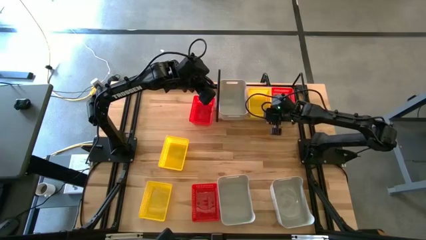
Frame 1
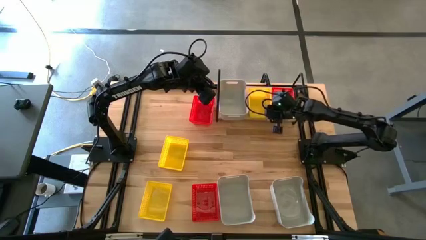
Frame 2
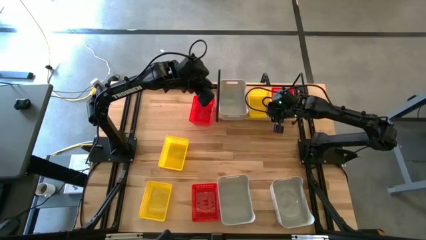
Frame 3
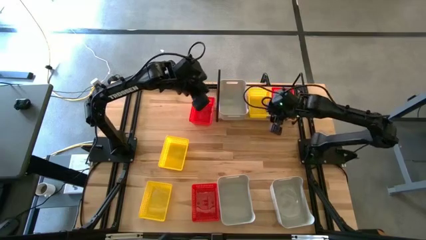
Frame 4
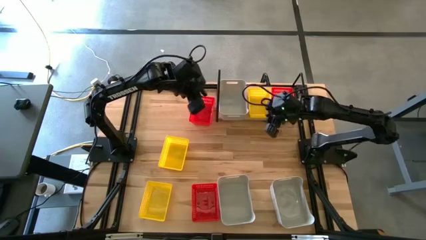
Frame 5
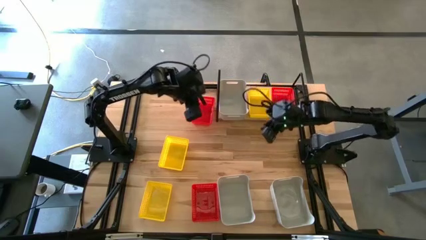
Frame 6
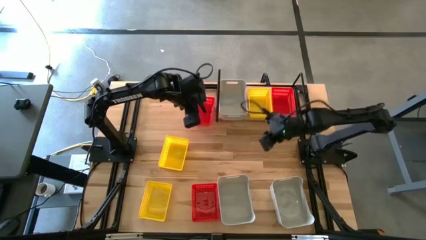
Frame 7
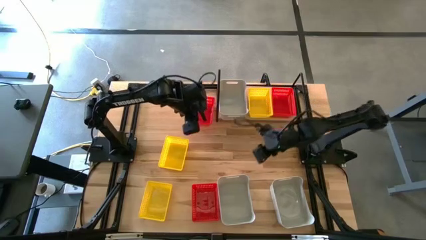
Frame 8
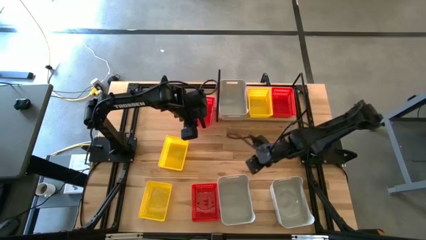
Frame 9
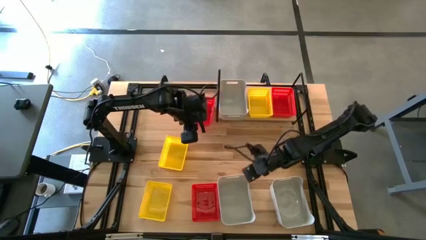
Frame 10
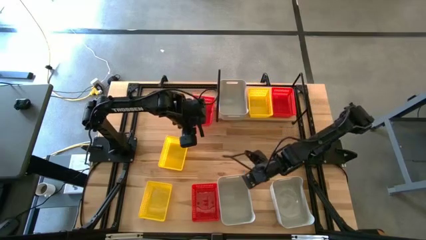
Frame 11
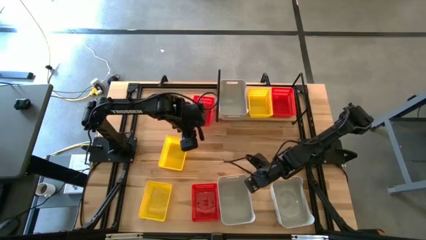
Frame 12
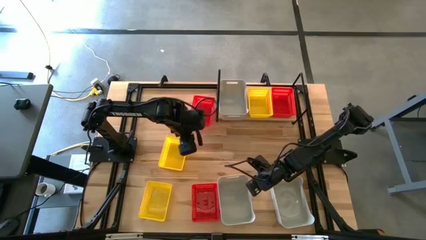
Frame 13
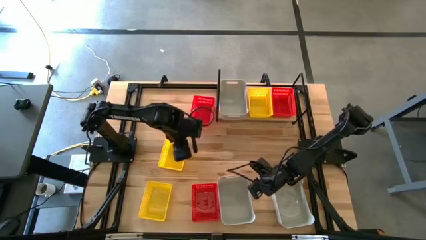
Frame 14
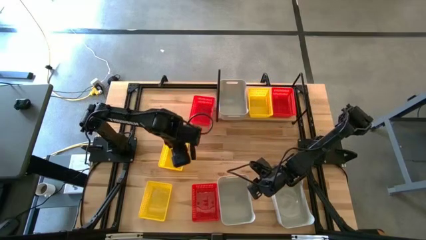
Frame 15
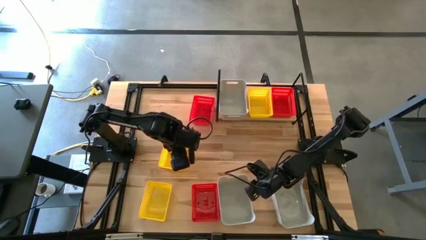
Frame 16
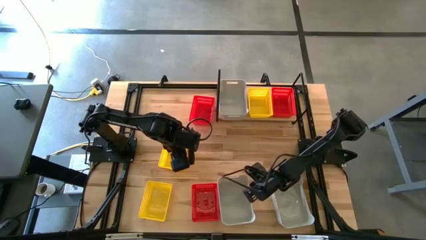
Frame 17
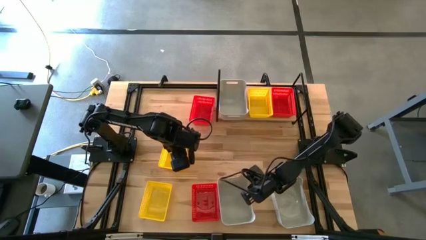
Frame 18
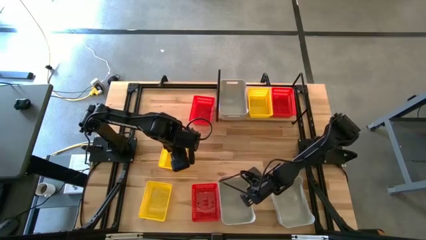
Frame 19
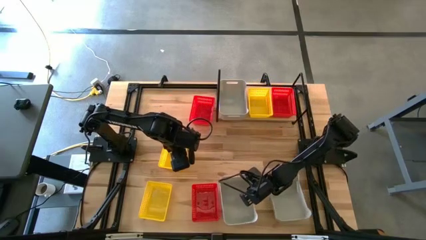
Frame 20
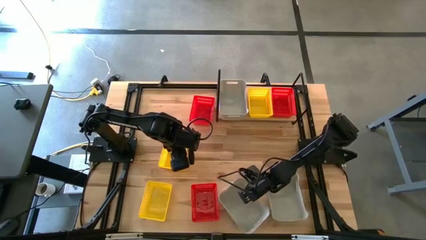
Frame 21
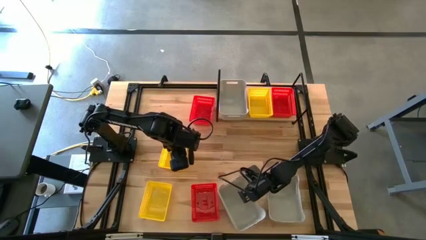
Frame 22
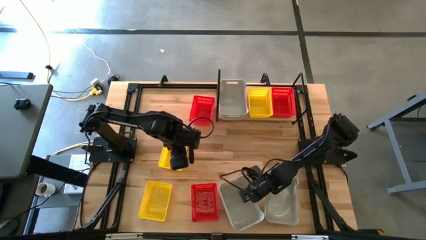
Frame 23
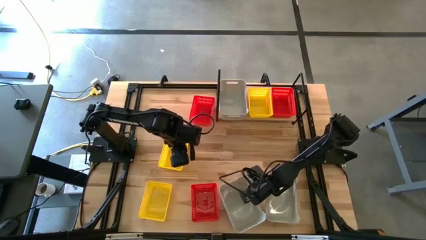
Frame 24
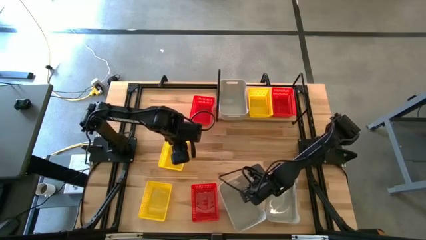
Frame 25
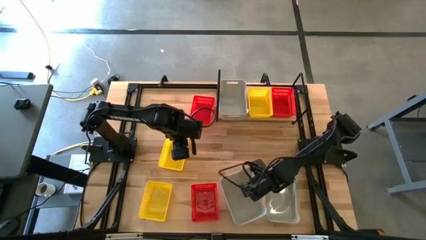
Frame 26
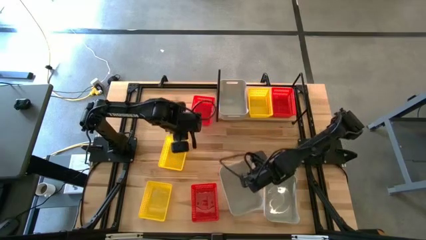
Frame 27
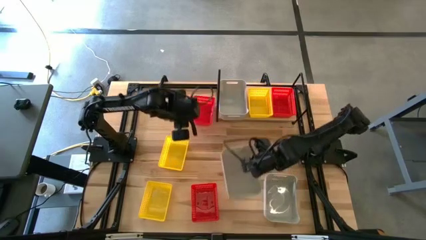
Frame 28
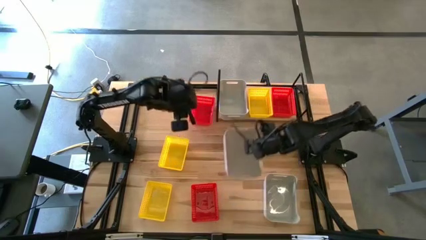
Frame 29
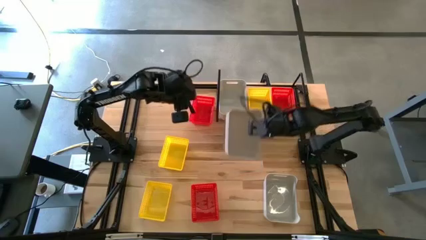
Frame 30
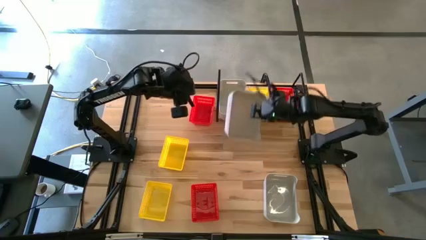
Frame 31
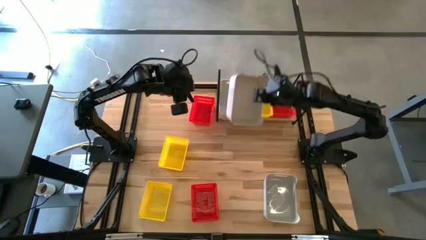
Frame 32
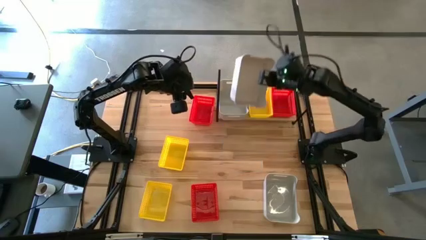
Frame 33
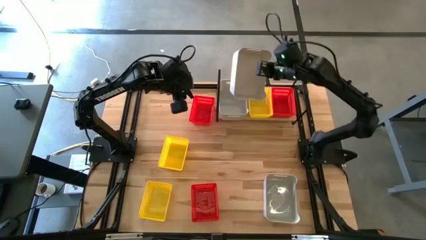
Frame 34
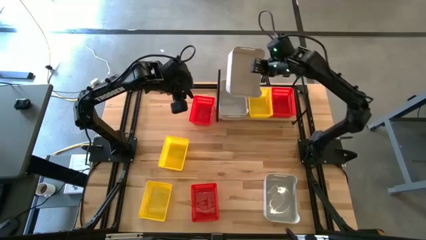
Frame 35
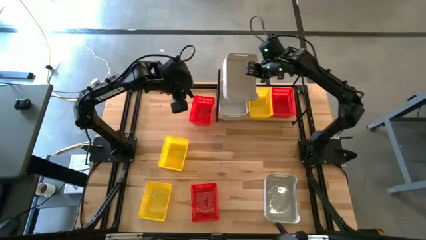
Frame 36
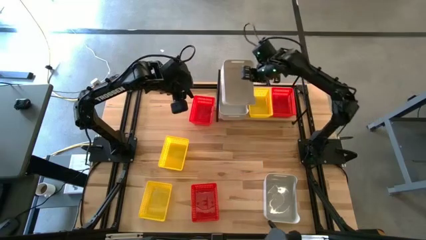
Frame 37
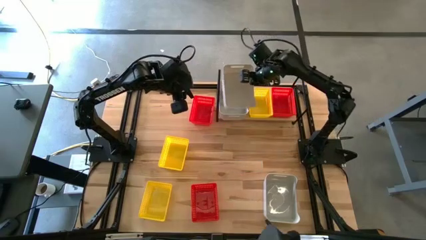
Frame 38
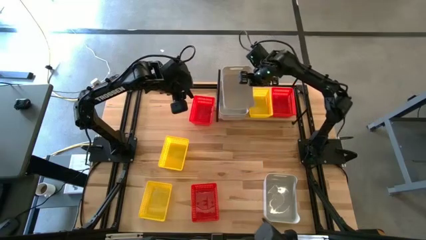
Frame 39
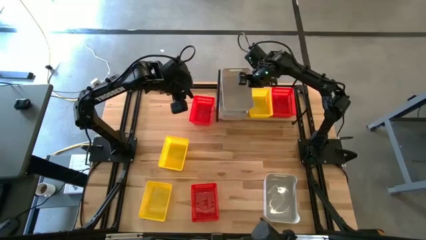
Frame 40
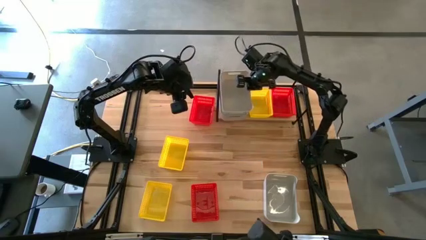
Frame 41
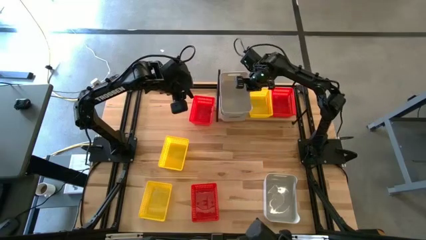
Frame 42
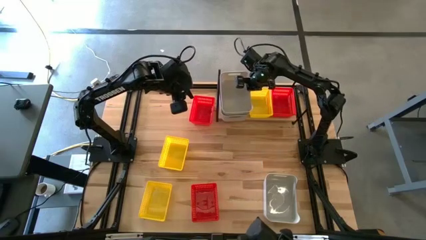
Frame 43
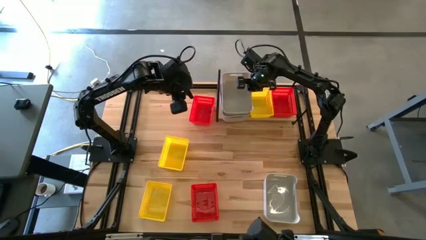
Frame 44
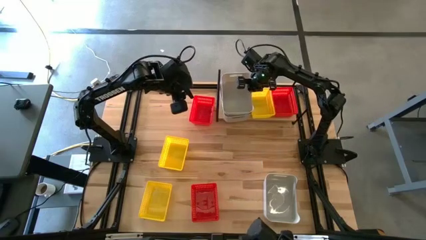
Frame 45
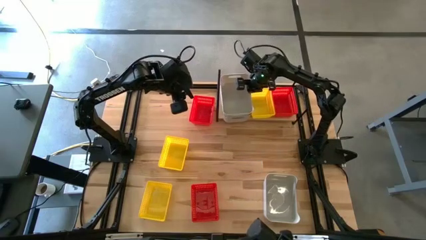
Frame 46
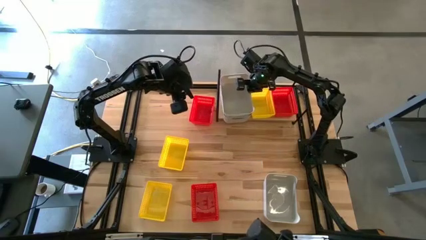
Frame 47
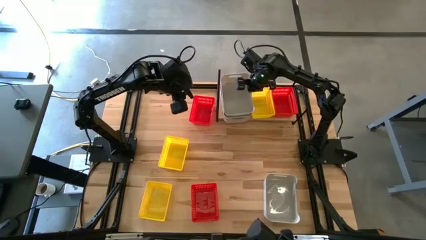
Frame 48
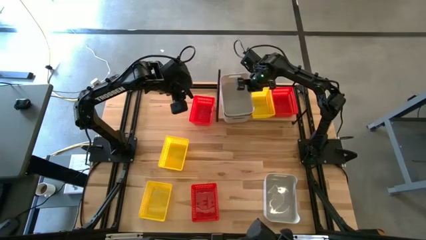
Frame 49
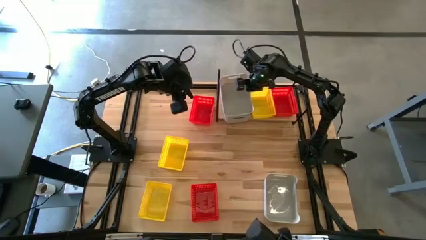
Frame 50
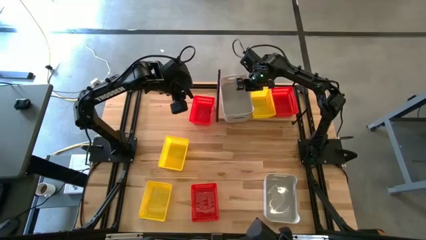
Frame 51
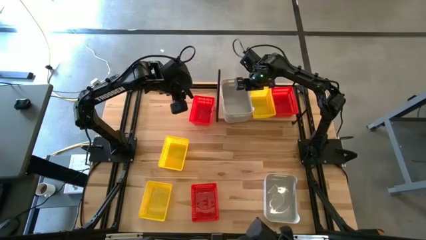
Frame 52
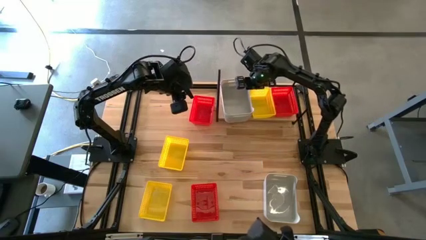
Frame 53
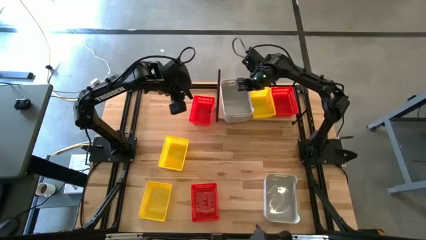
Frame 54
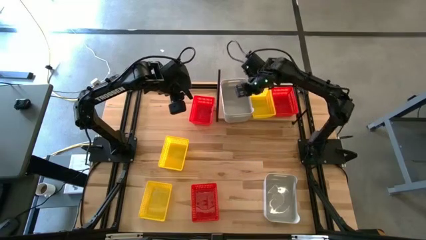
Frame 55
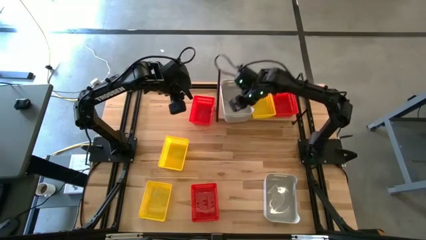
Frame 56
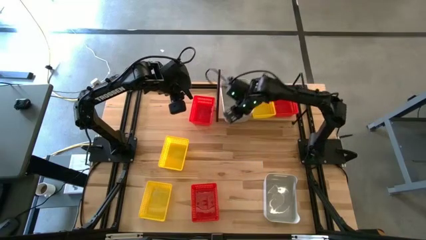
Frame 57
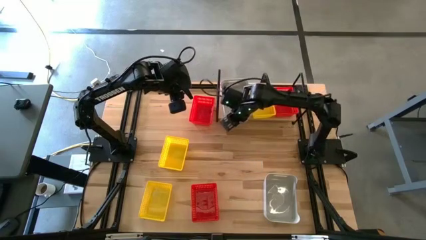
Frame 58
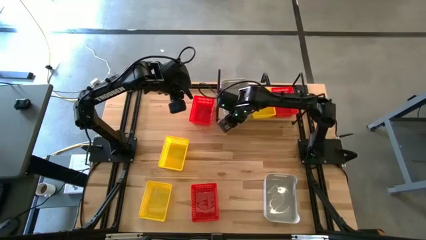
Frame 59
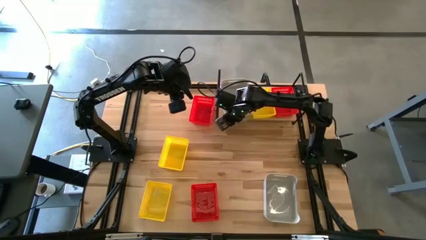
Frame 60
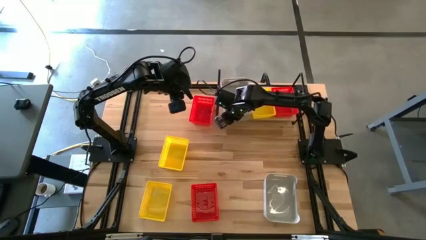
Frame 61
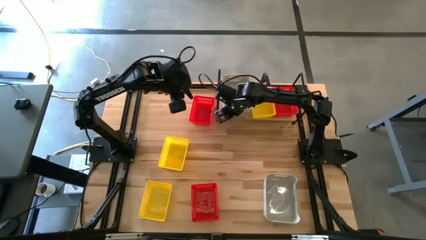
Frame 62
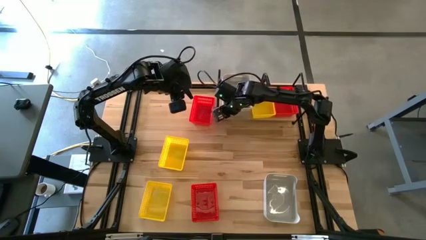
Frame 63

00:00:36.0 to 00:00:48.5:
Task: Stack baskets on shelf by color
Stack the left gray bin on top of the gray bin on the shelf
